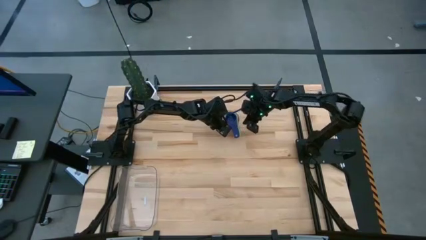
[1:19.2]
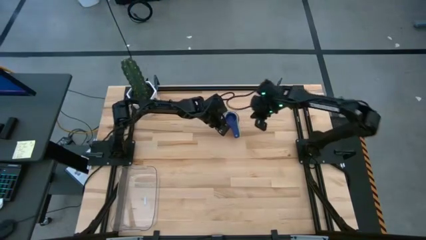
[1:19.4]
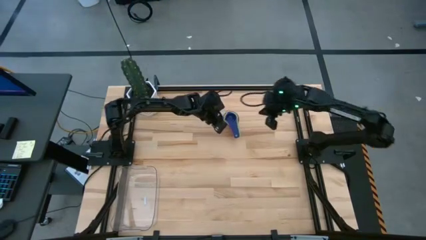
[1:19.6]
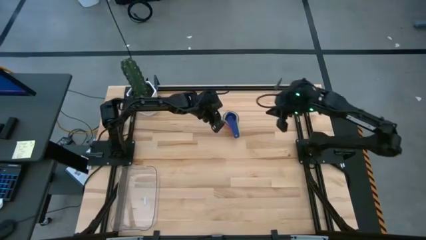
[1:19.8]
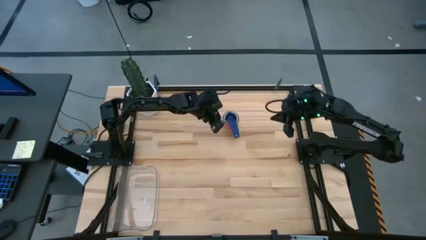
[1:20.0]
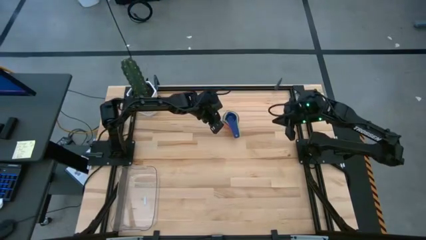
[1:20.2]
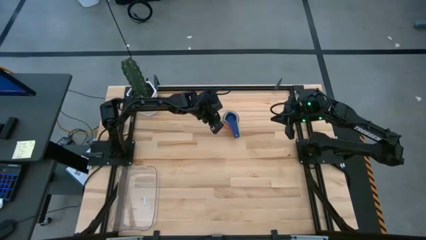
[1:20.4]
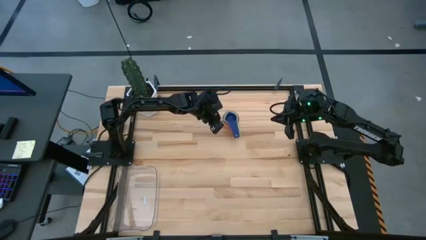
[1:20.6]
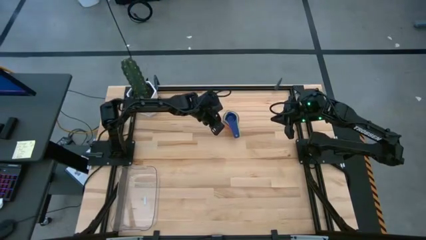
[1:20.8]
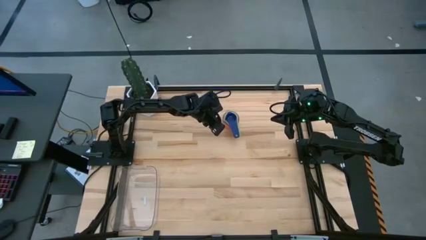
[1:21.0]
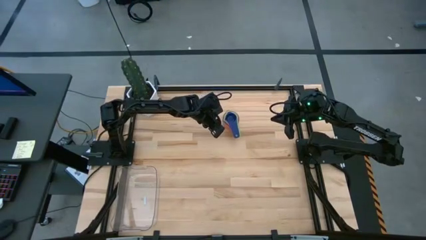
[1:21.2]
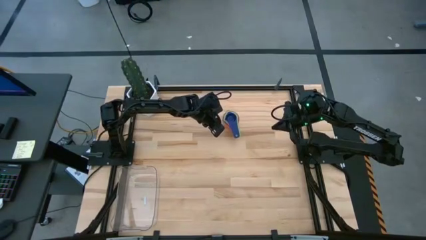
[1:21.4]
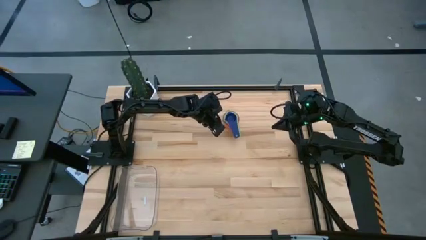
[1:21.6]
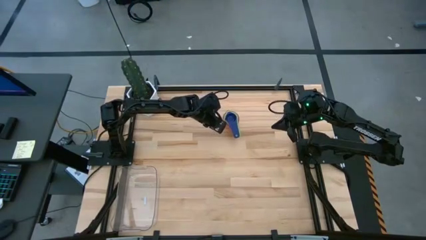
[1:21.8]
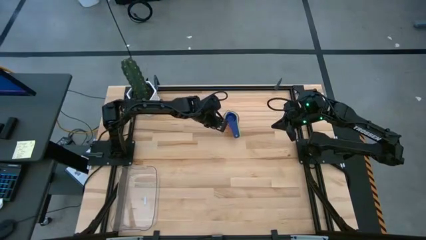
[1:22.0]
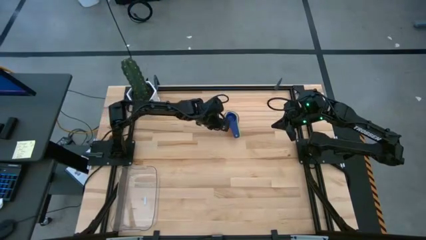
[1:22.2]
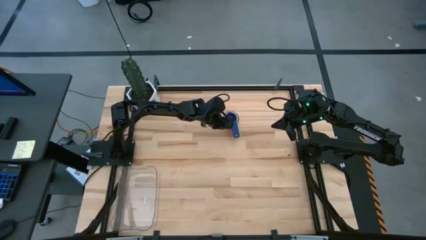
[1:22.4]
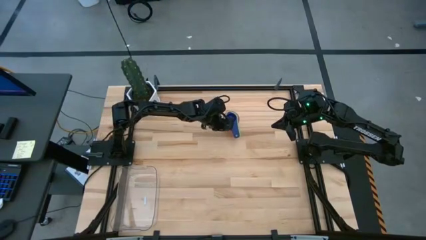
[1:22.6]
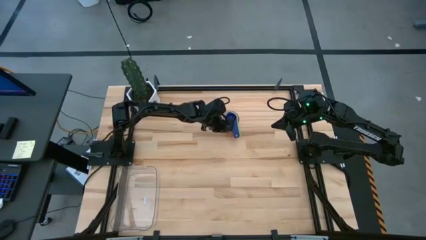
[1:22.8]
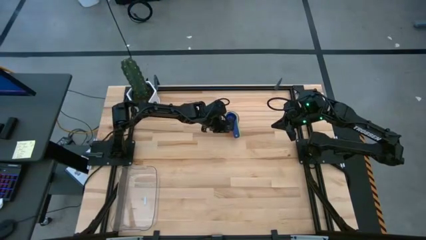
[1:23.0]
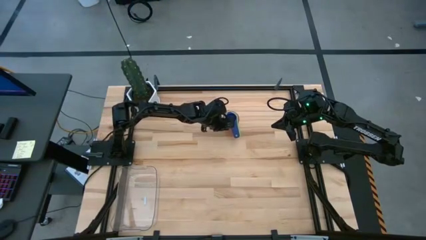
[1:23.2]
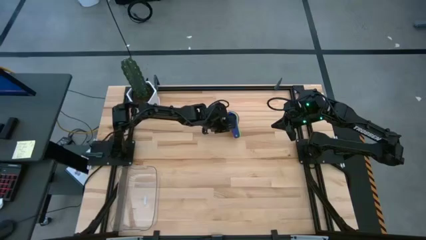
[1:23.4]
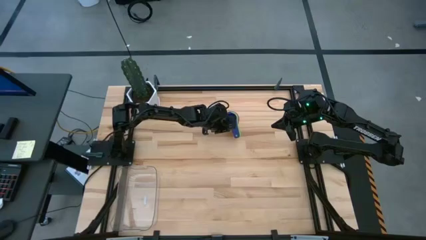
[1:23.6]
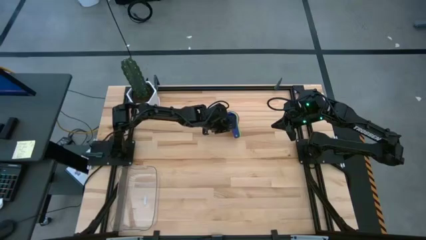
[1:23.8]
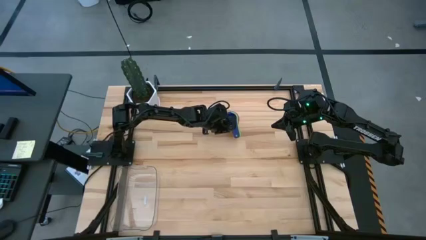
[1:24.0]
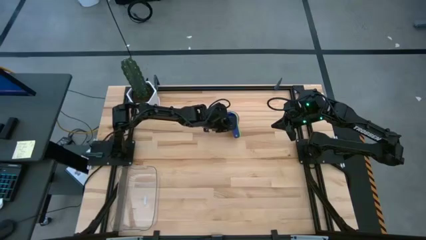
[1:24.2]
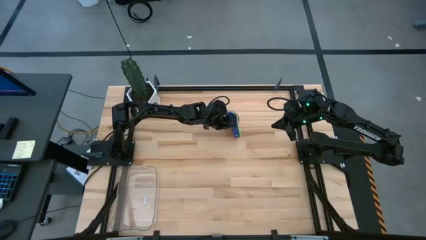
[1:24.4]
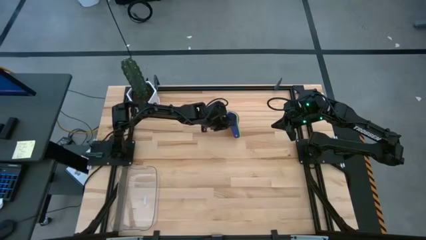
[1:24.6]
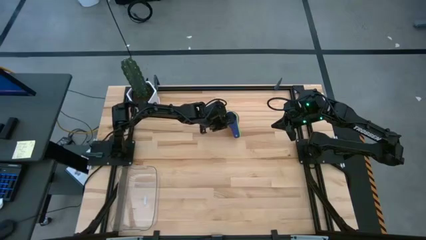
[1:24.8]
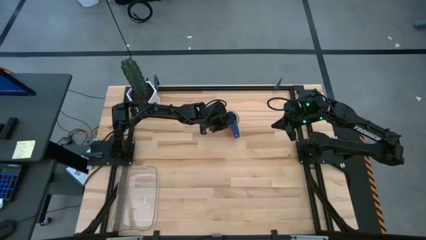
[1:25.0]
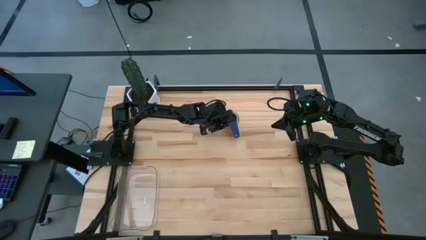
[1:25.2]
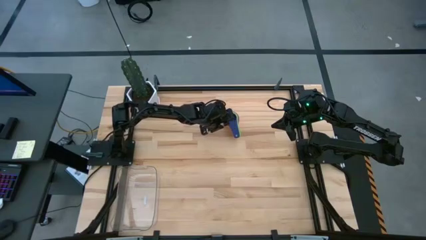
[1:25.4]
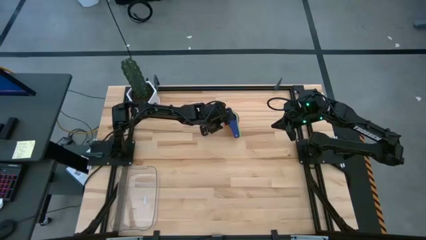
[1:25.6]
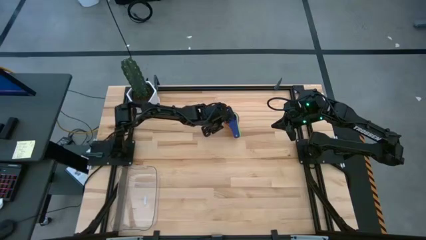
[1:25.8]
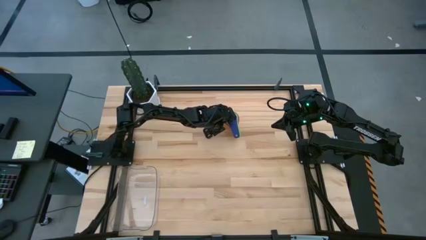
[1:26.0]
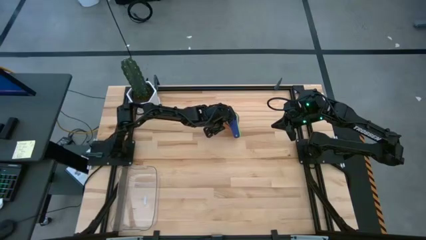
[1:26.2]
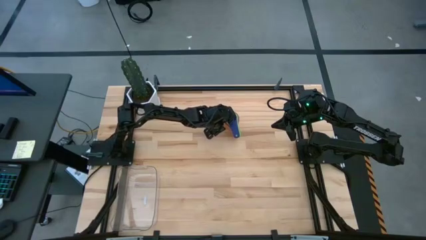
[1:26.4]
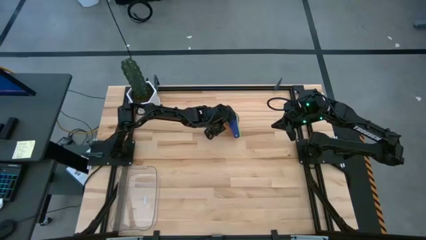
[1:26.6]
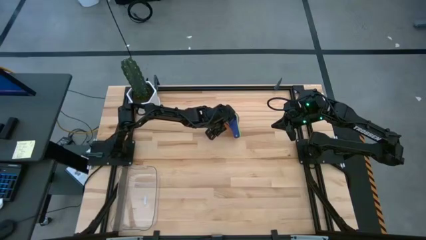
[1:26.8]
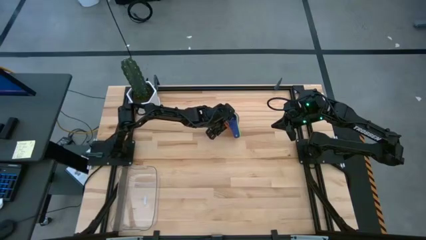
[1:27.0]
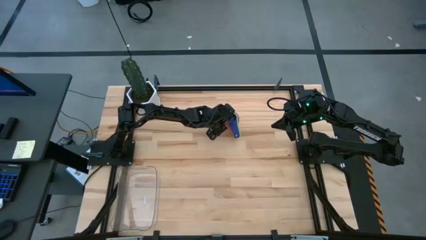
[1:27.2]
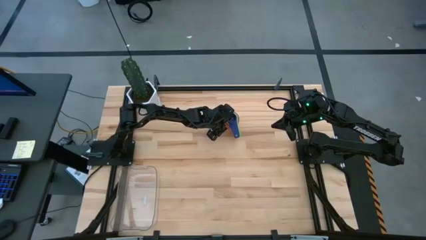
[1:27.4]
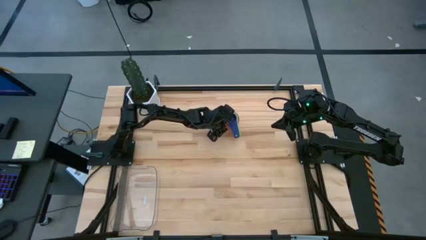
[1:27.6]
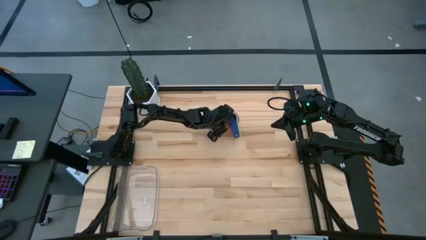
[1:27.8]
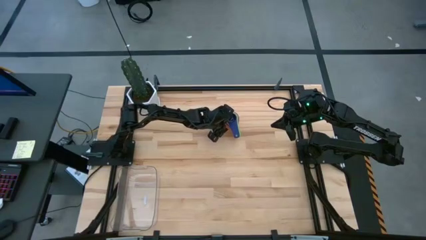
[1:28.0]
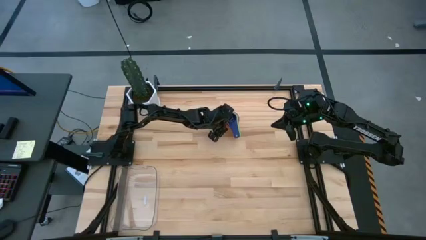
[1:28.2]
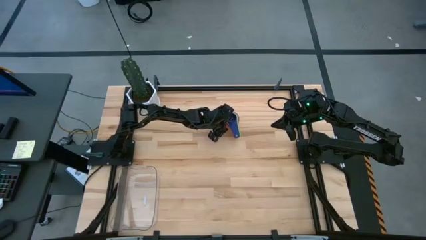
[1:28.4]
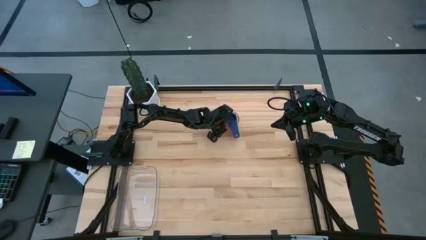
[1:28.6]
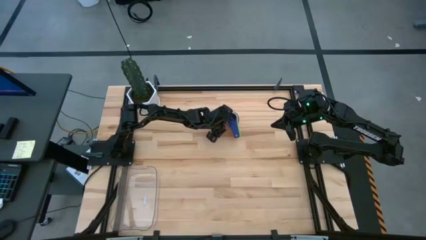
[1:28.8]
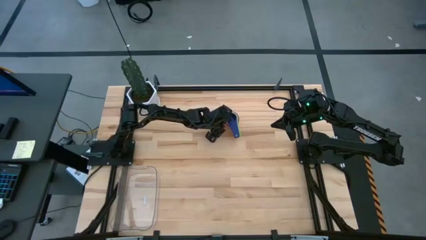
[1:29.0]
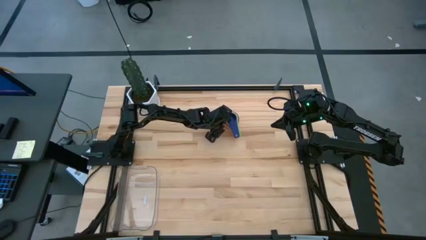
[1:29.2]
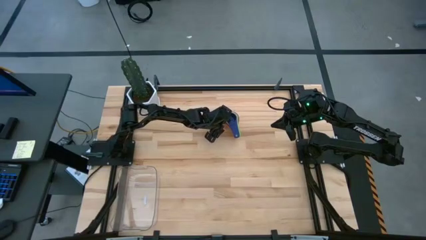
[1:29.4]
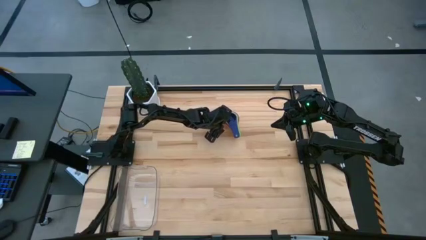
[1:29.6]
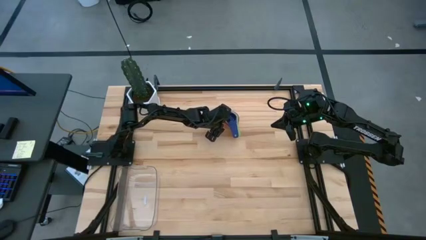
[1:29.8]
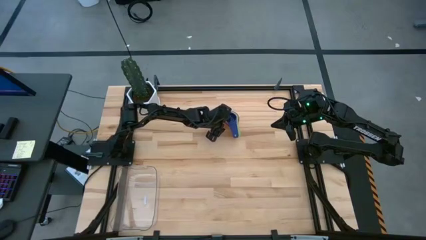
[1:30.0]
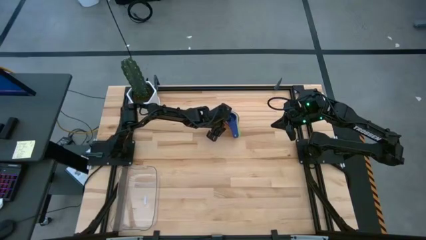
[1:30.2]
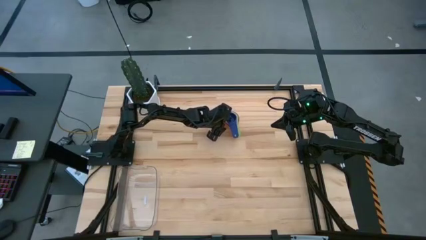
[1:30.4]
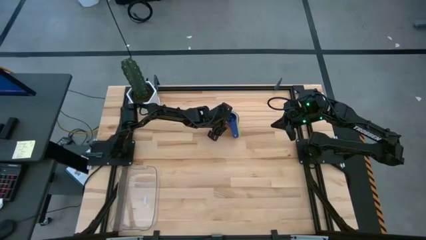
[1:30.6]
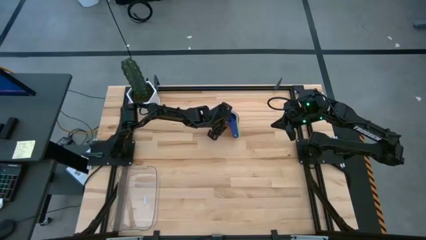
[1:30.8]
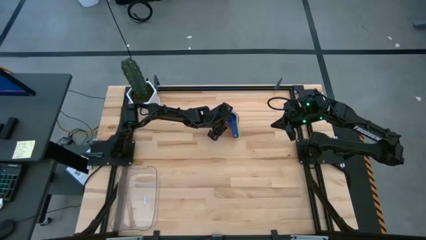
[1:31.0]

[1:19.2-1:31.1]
Task: Nest measuring cups in basket
Put the stacked colored measuring cups into the transparent bin
